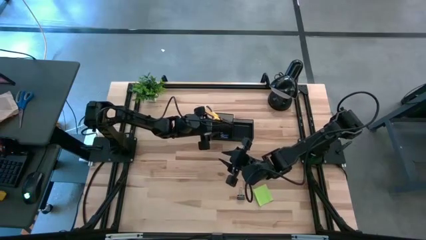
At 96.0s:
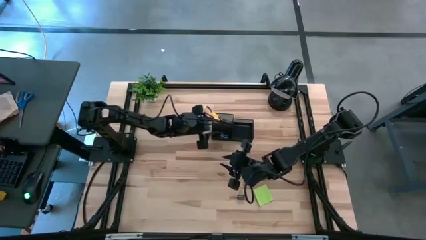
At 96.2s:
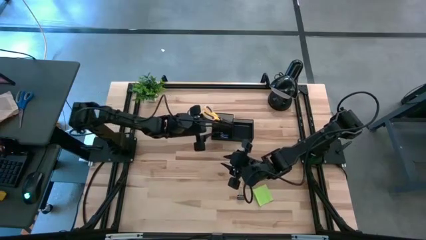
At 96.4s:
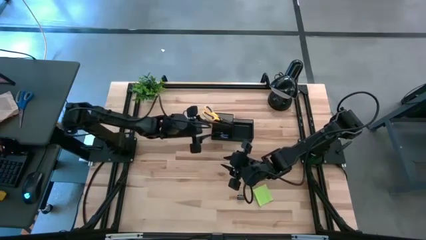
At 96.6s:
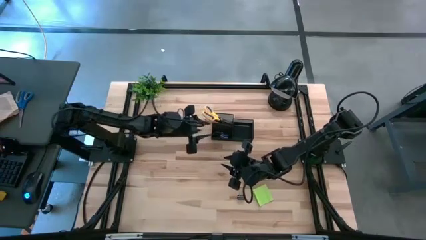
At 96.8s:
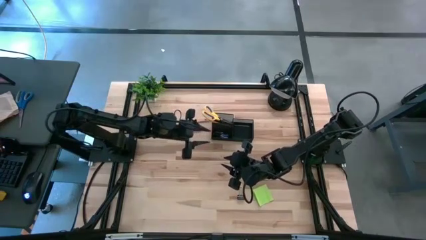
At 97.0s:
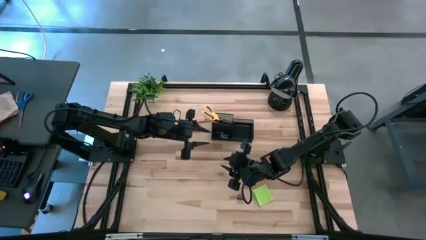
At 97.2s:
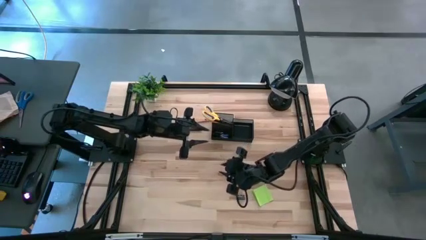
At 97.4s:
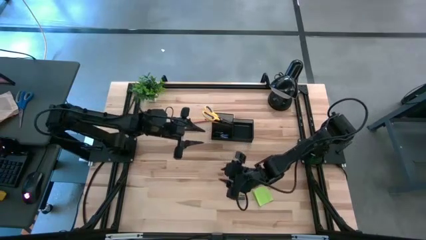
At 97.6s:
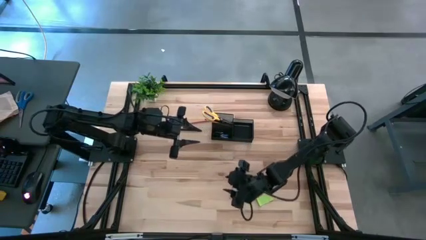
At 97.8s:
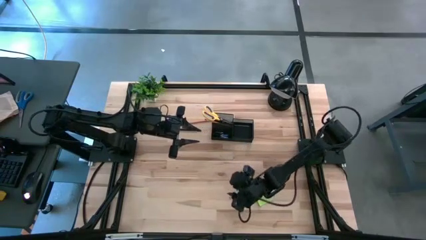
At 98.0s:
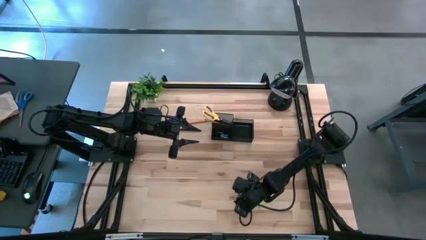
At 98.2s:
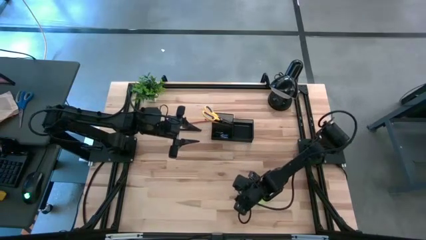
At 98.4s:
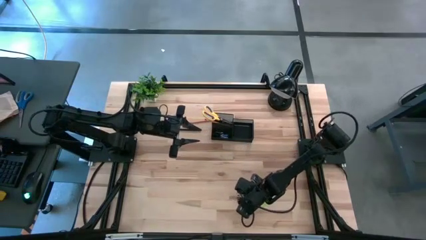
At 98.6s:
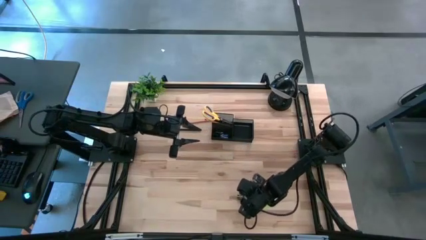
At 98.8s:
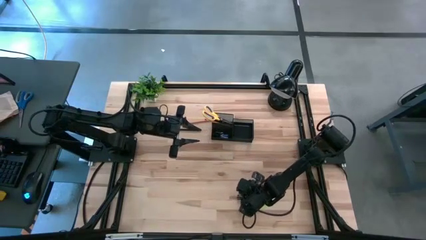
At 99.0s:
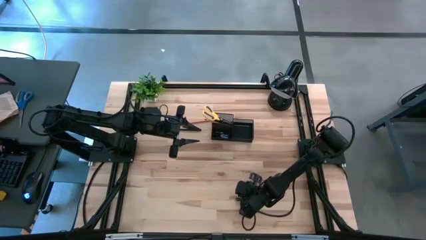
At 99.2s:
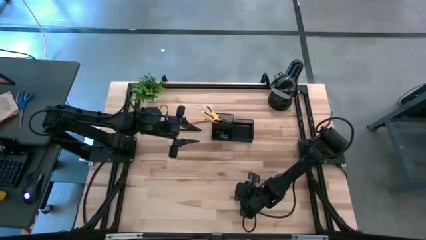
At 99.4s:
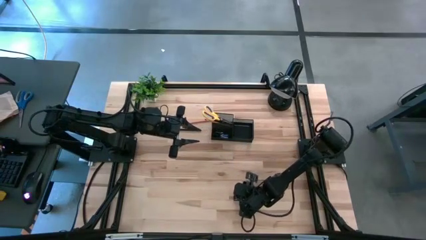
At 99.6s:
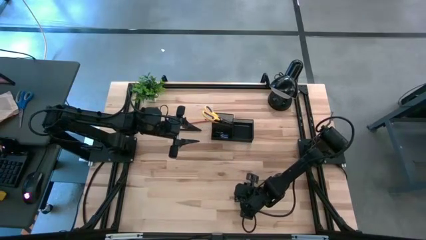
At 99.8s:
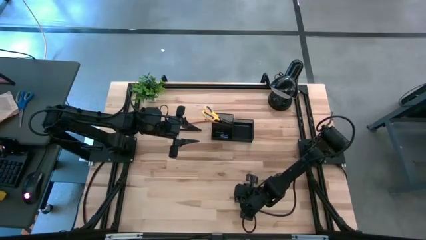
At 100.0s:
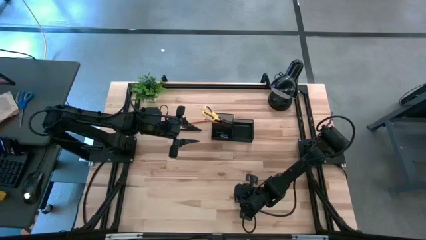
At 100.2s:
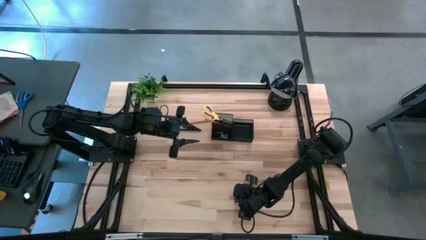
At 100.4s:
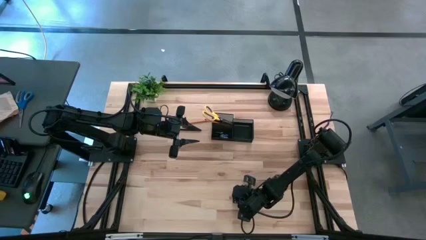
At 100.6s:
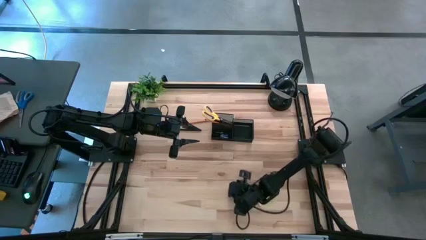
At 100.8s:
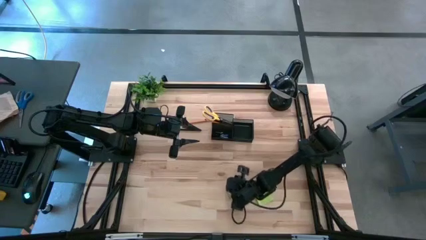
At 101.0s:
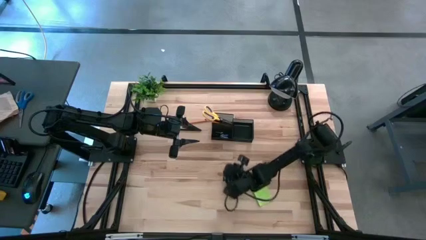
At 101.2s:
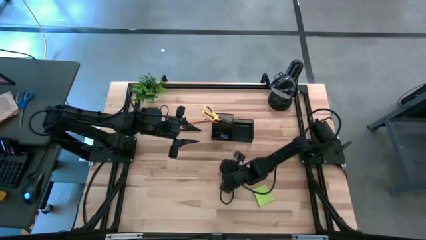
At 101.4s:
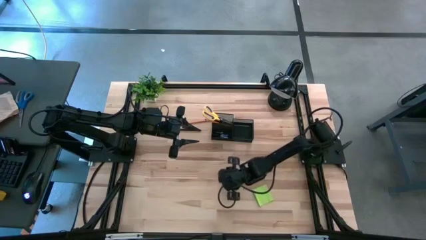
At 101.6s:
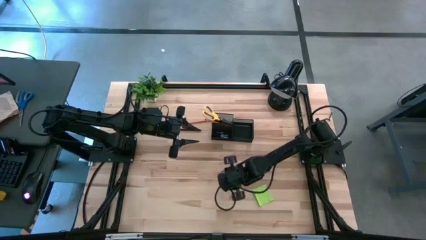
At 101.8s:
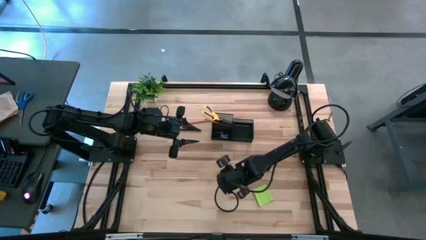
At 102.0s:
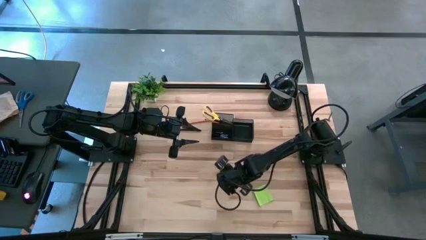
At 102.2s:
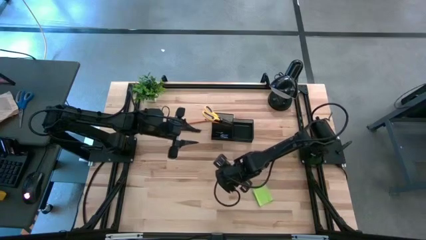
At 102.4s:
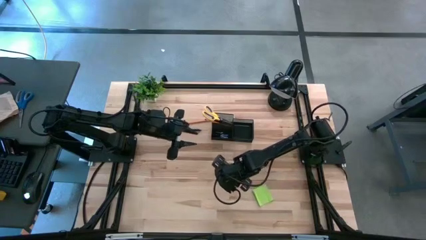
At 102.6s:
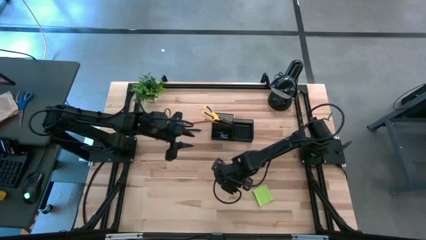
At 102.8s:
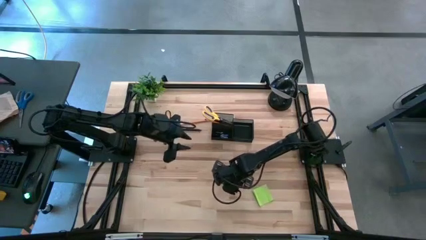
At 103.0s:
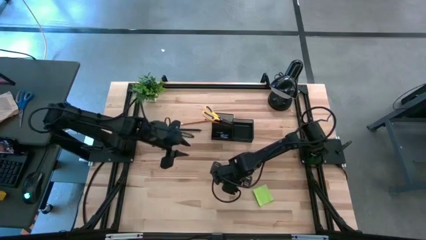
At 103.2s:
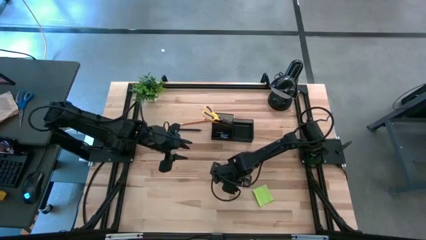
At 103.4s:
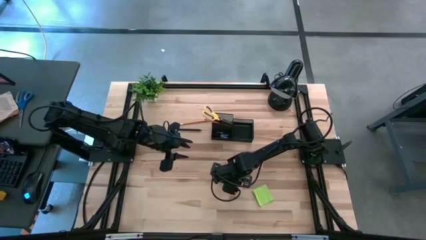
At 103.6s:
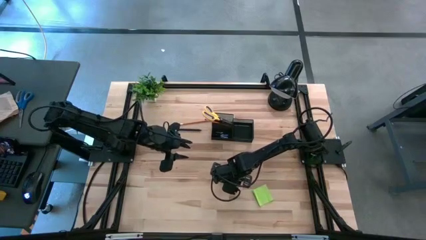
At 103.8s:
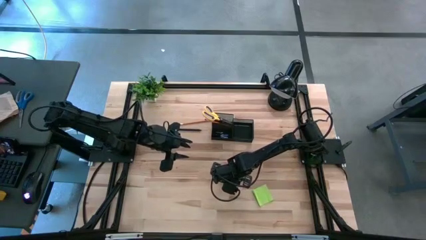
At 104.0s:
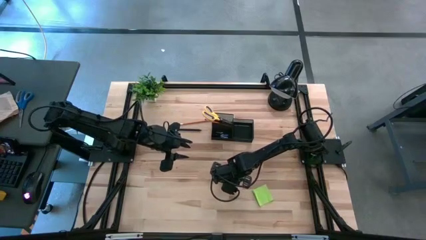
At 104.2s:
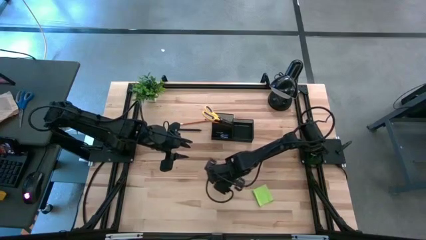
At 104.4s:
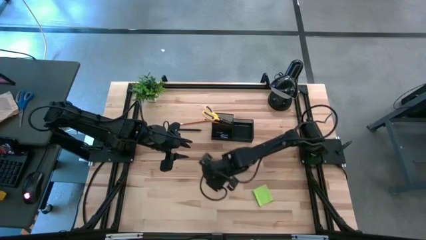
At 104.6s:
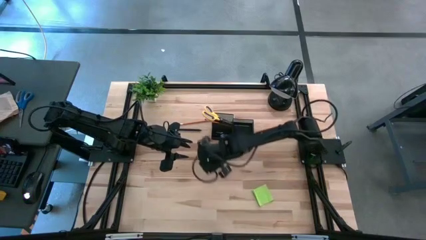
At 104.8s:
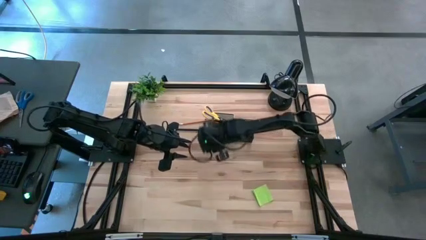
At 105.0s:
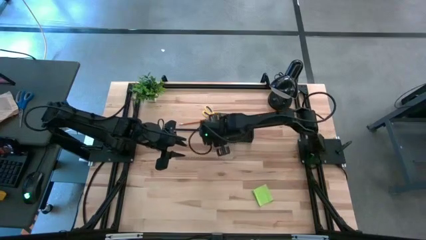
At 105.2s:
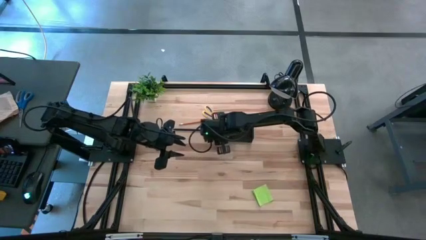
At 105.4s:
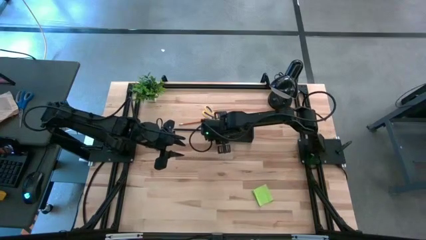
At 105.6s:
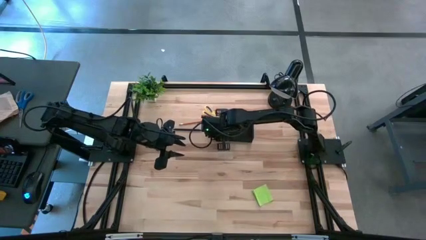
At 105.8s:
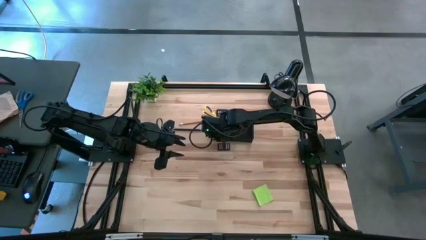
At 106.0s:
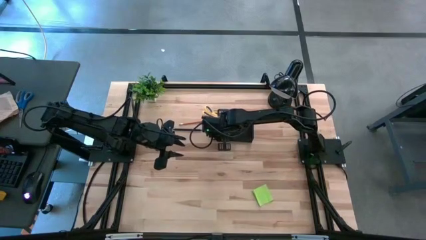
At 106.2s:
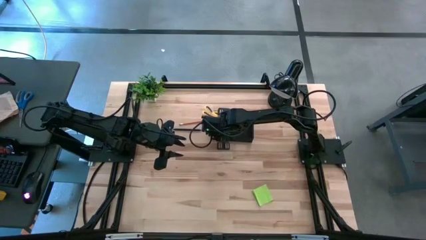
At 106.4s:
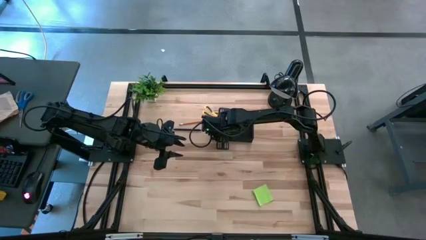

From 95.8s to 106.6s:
Task: Pick and place office supplies into organizer
Put the black binder clip into the desk organizer

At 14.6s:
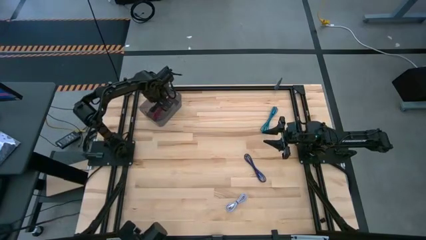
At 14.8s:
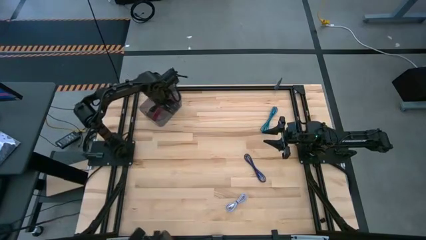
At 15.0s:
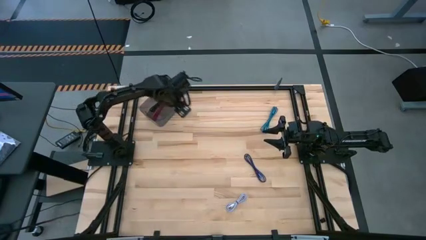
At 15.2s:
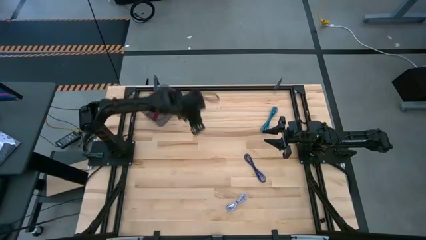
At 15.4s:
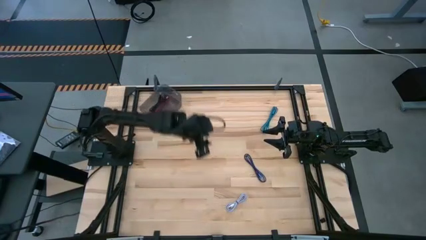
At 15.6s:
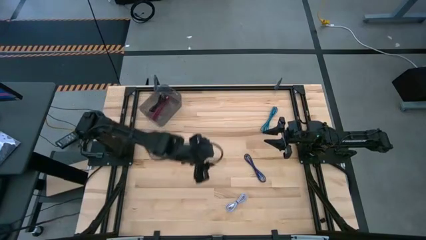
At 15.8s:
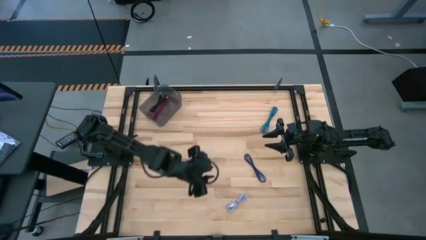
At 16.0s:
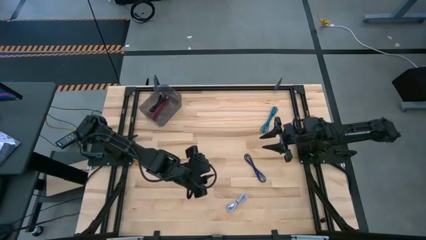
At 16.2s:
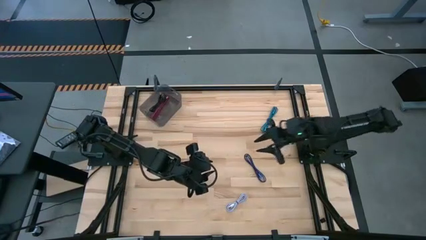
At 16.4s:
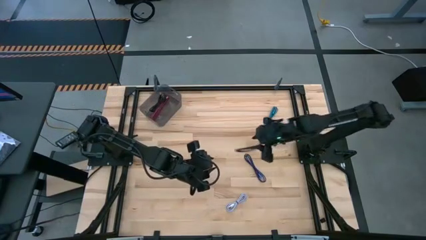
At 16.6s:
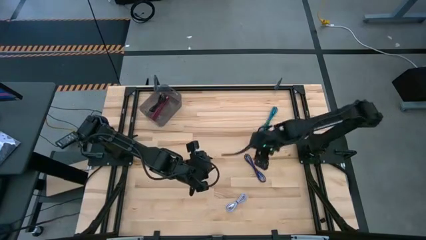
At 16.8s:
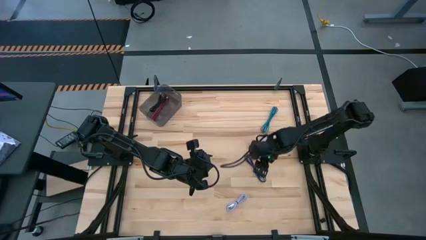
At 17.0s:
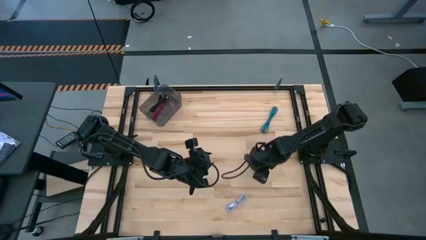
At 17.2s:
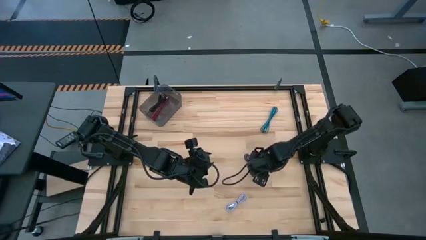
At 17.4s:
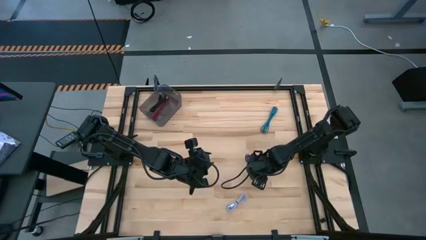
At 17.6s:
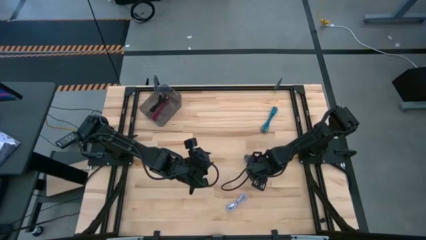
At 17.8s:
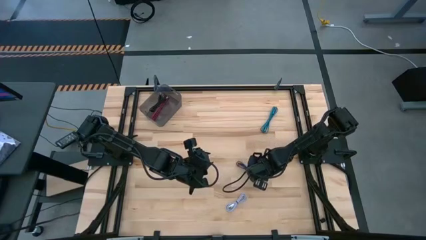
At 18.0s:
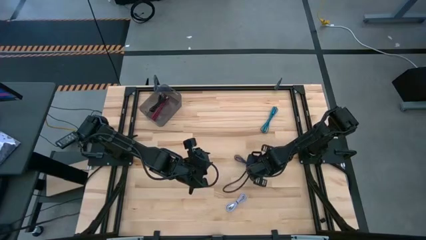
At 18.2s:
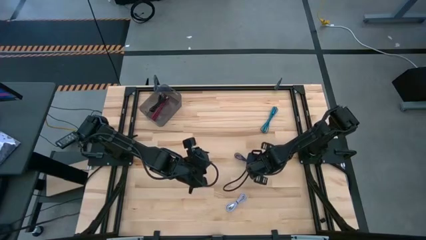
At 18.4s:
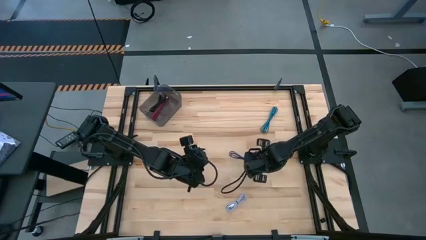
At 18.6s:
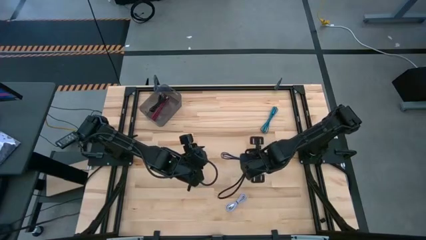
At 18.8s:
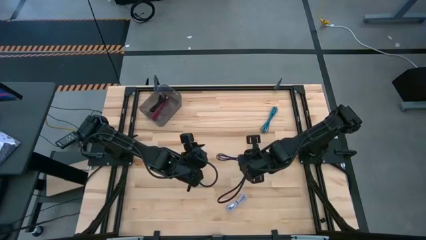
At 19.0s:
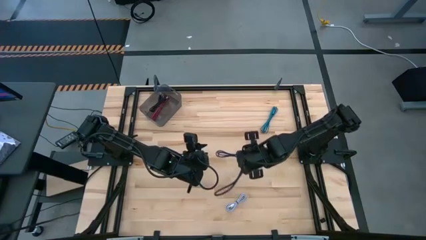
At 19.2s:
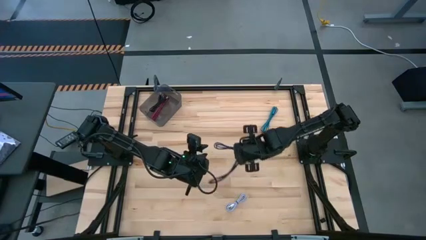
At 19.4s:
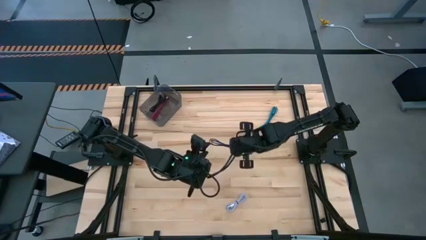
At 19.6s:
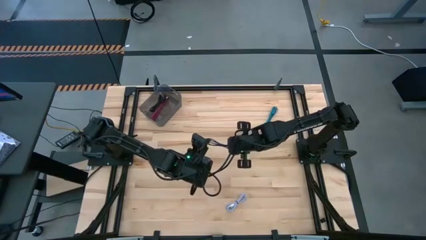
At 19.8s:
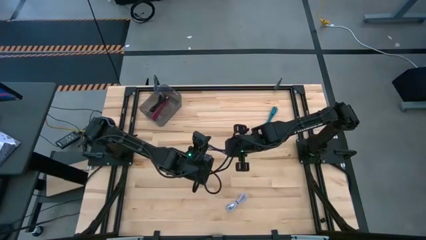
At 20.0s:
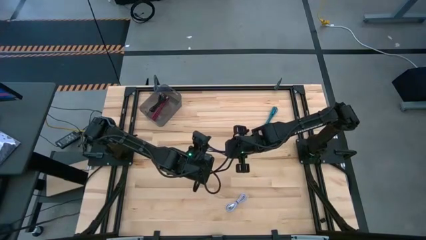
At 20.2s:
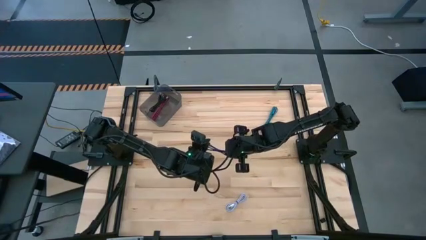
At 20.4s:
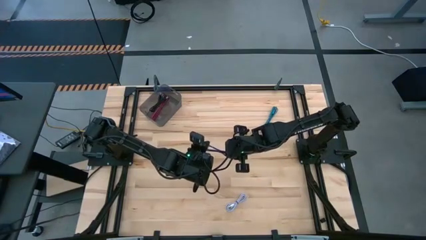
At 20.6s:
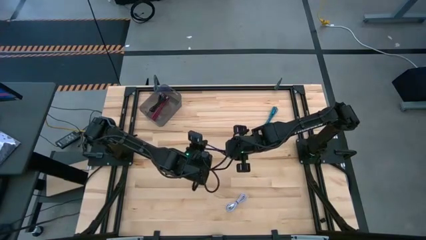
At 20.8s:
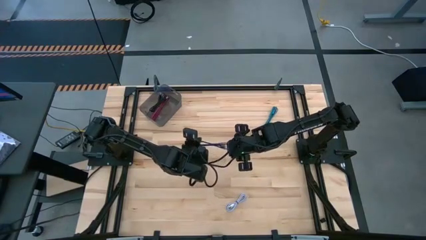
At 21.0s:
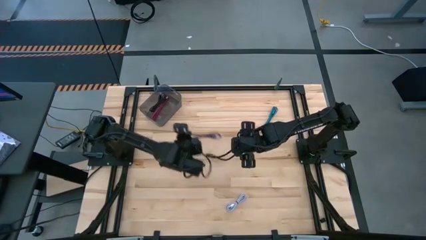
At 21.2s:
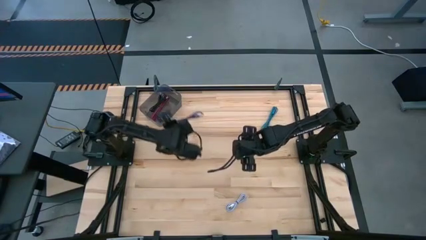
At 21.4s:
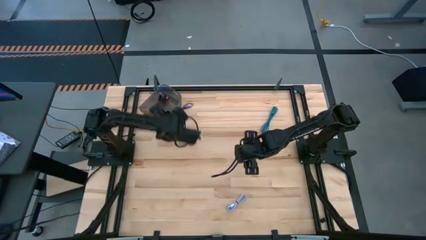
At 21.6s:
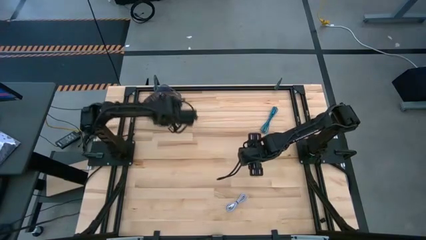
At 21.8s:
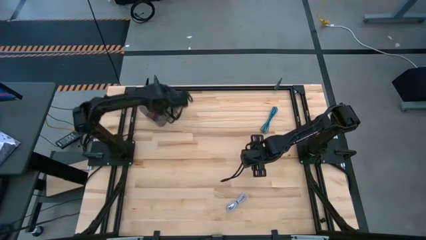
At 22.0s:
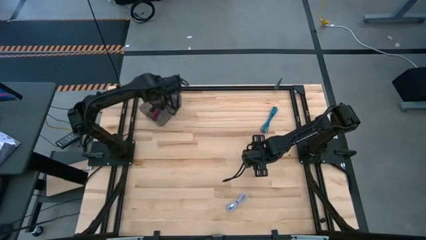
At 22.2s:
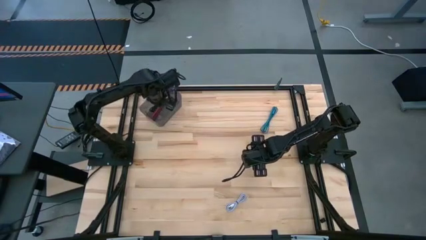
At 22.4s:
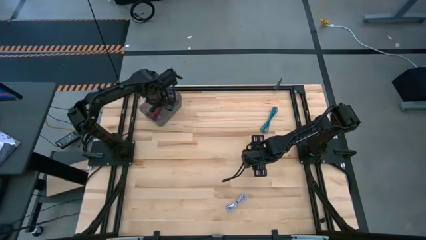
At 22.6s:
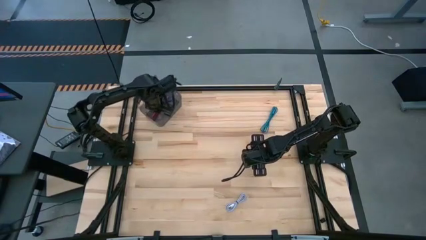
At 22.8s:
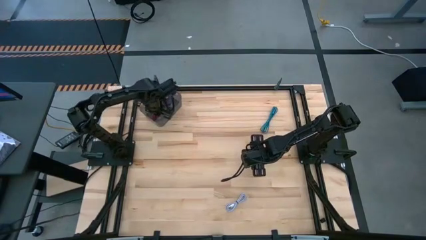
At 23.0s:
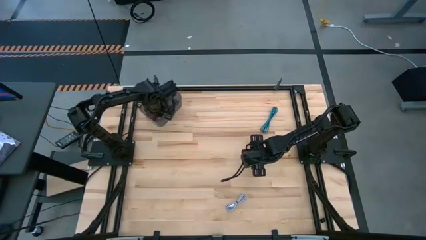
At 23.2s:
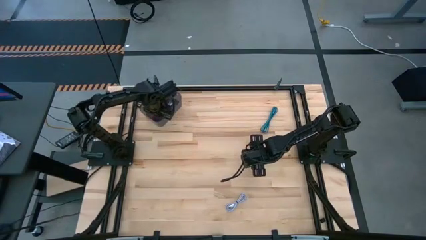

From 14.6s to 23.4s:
Task: Pick and place USB-C Cables
Put the dark blue USB cable into the black bin
